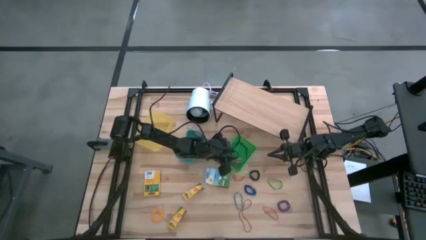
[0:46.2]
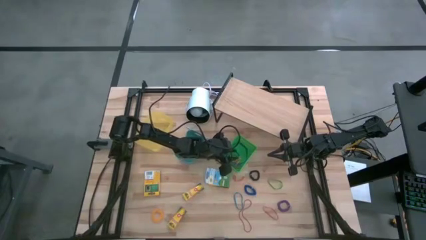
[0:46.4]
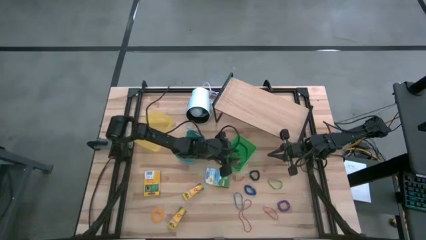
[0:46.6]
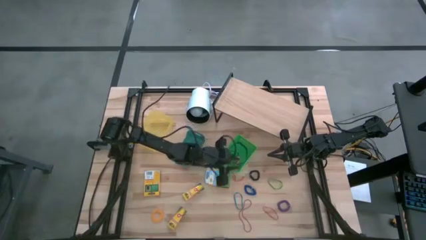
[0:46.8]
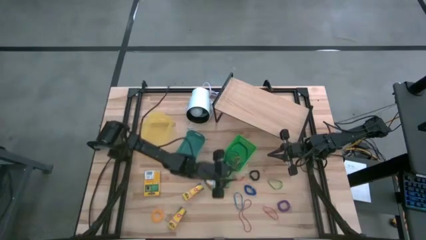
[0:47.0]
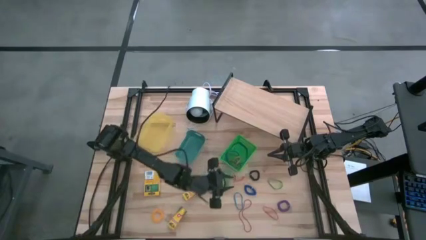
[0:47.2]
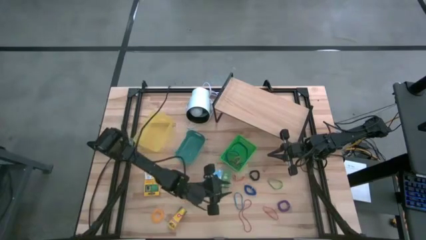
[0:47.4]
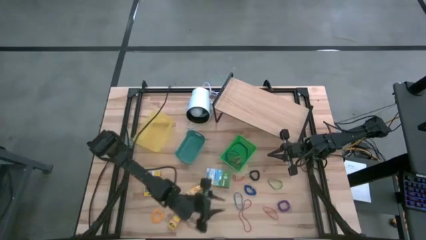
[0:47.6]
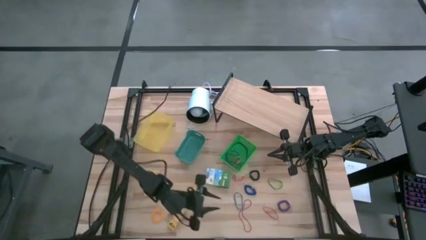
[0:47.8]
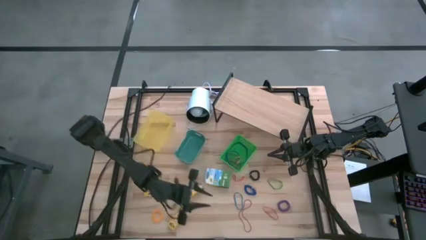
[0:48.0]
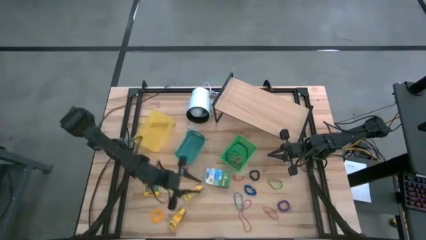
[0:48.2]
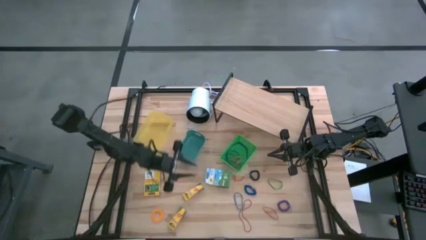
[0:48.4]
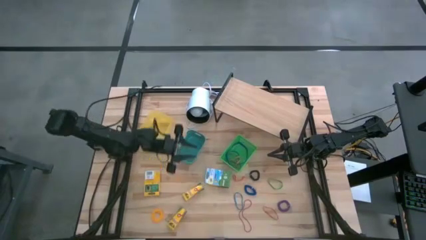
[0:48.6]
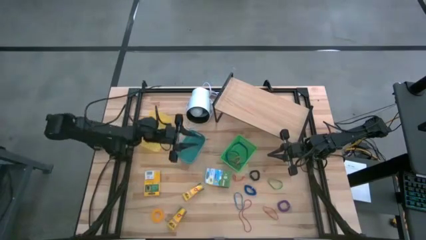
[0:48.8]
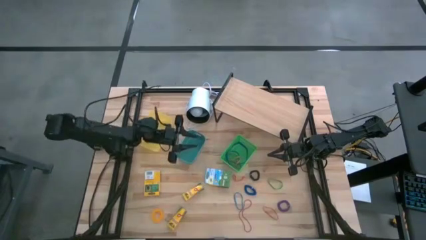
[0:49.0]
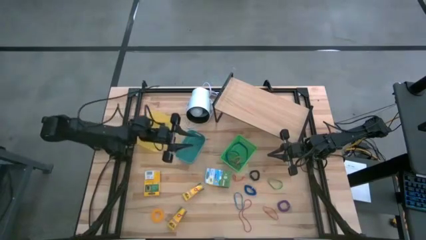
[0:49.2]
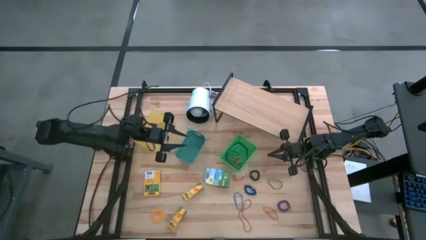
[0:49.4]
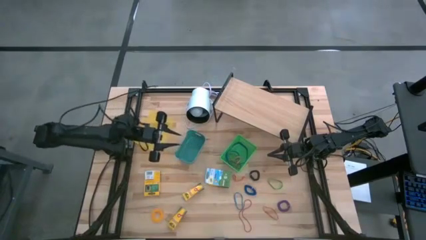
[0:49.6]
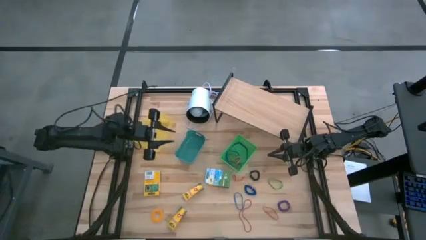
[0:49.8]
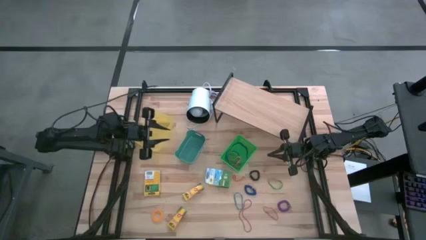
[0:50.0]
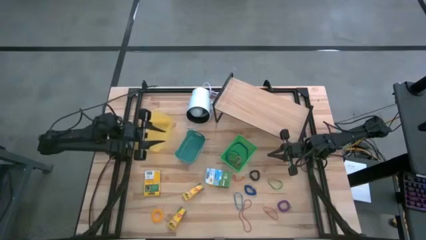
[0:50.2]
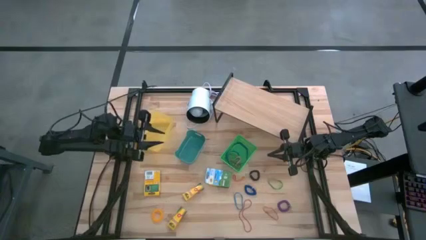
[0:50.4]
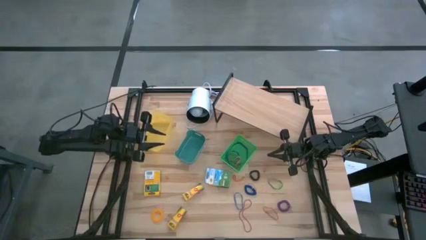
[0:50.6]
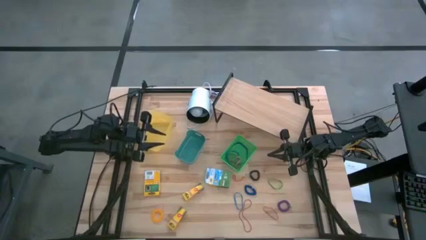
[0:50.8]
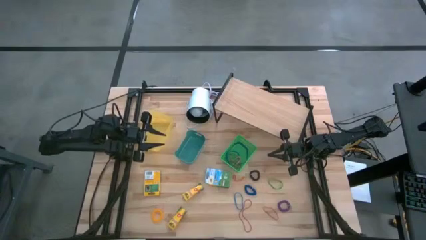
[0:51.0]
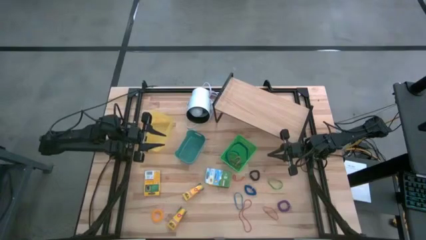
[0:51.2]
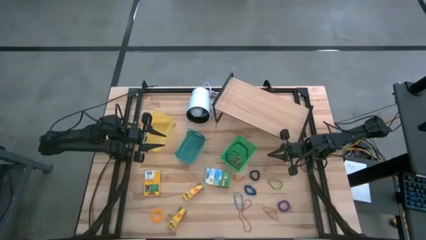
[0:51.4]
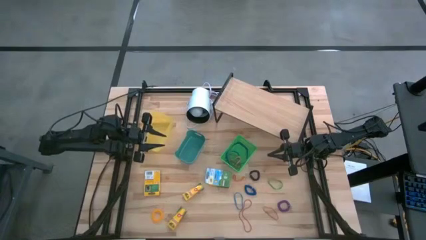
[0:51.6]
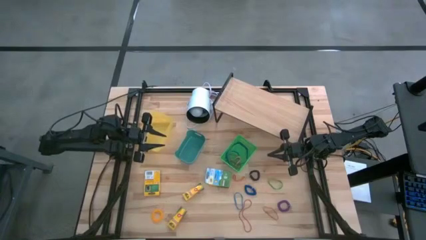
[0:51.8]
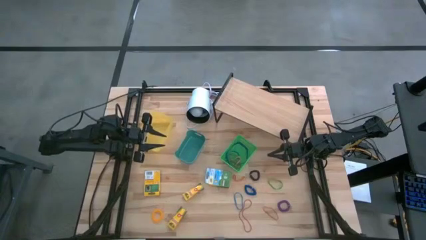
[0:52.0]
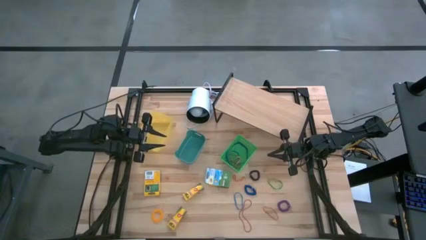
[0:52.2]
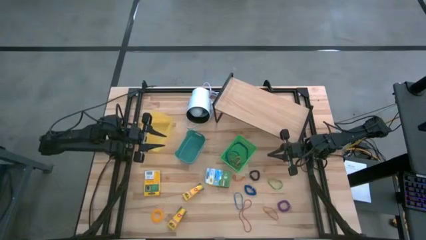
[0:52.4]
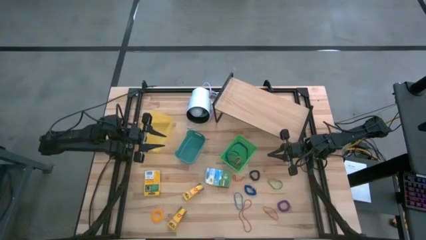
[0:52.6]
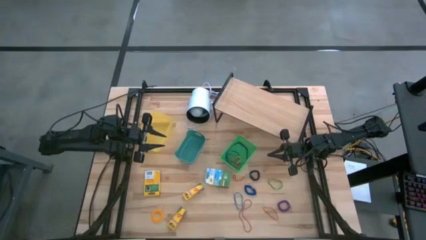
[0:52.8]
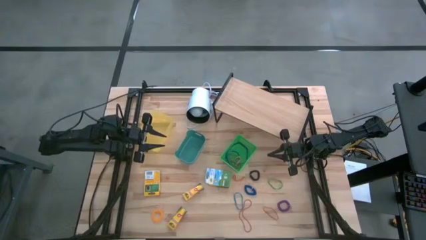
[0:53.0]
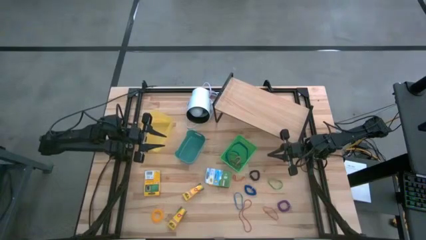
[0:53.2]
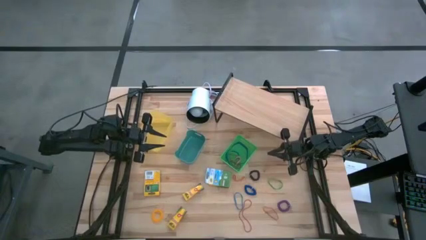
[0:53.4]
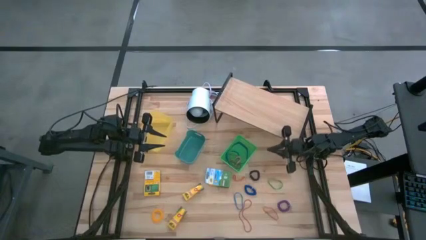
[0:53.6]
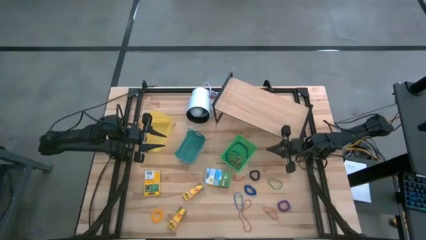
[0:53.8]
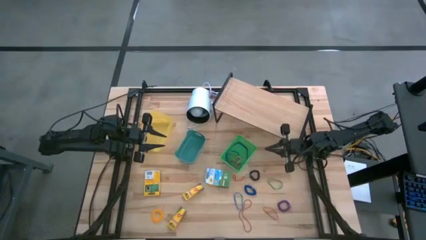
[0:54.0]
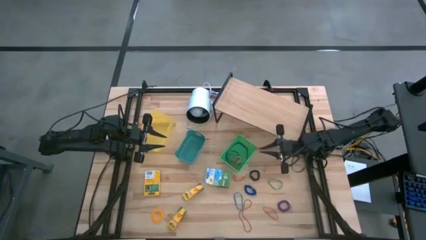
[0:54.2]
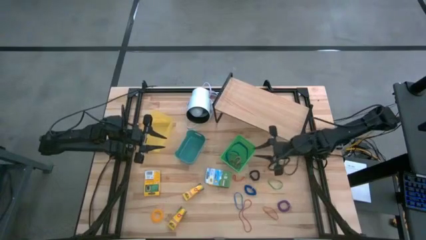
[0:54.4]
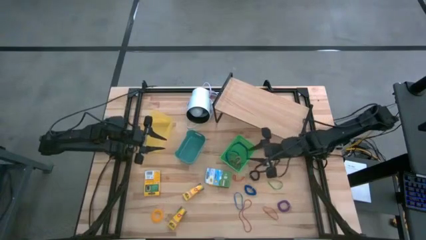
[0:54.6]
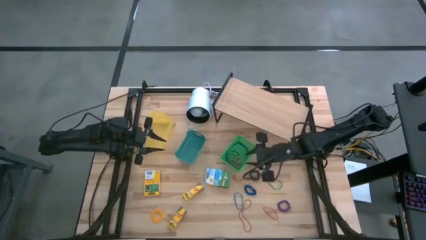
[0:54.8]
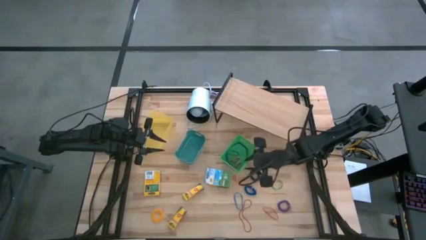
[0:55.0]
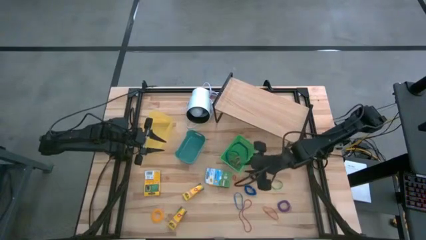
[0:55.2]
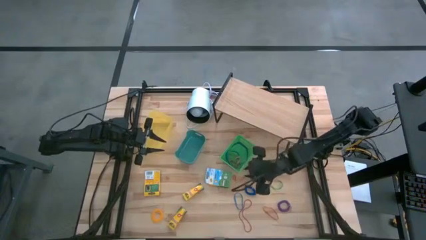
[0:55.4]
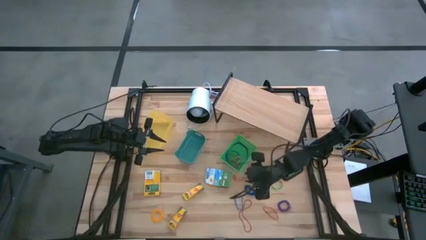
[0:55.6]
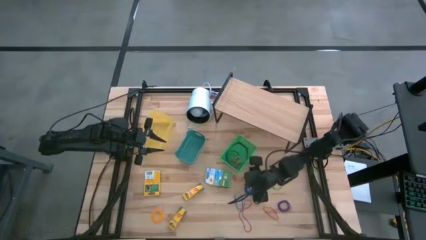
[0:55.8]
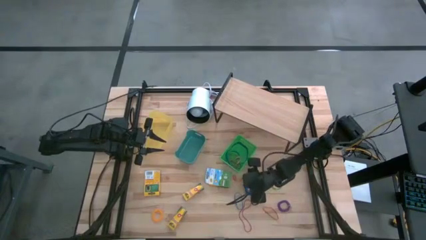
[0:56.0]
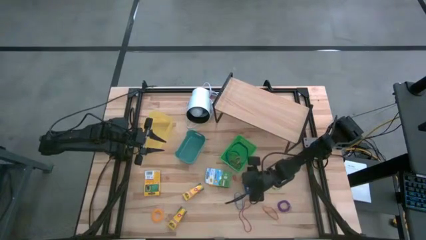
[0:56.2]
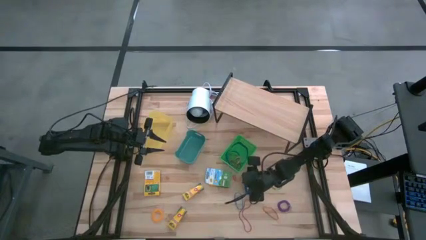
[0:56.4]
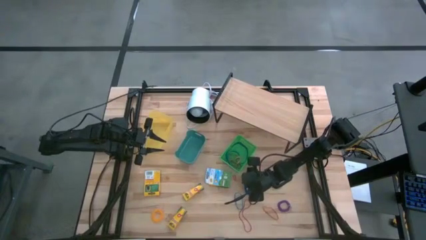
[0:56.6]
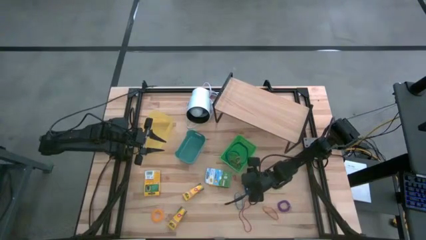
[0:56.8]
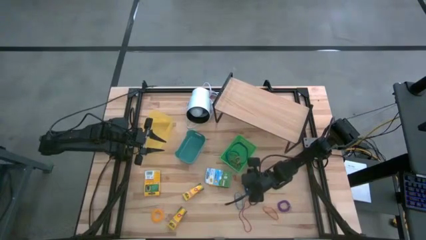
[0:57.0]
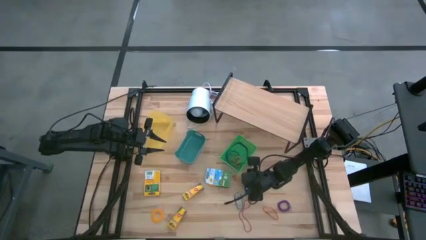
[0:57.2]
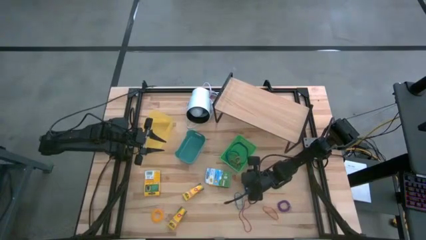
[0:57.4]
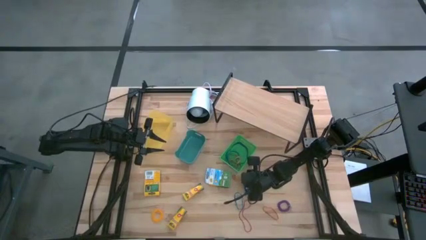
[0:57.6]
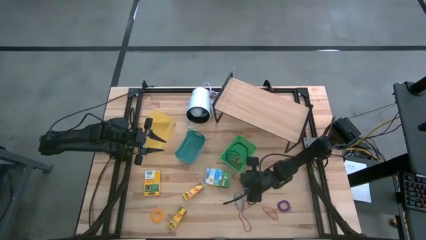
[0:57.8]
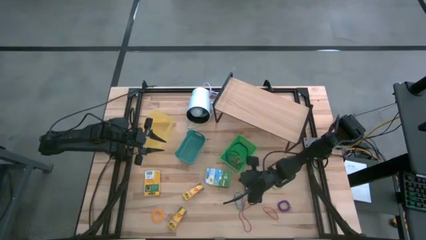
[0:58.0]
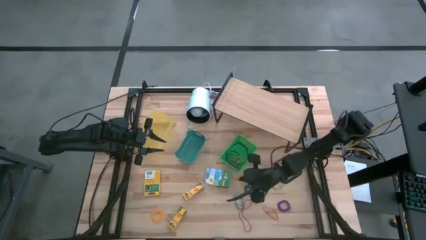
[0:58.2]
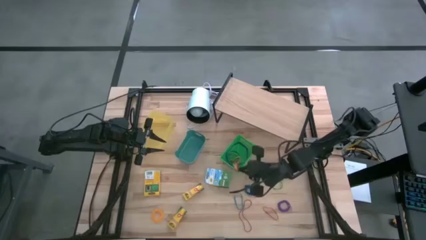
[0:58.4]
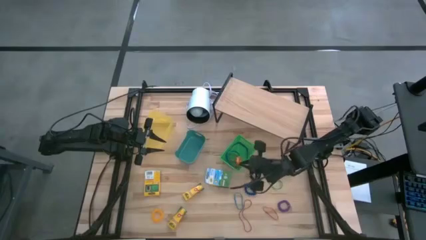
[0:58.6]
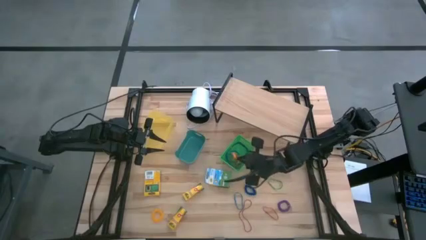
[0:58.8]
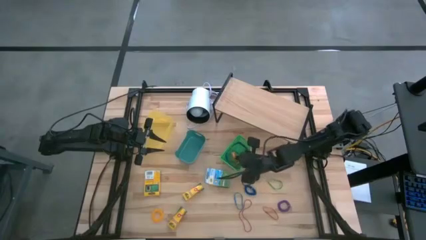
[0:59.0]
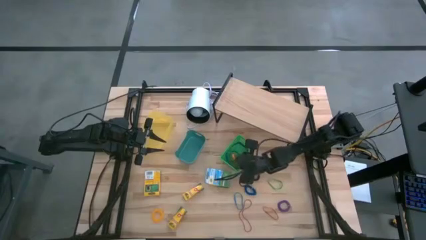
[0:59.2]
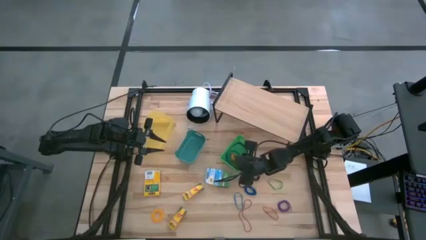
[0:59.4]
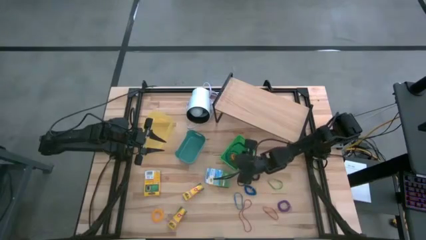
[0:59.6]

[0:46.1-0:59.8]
Task: Pick & Place Office Desk Supplies
Put the top left orange rubber band into the green bin
